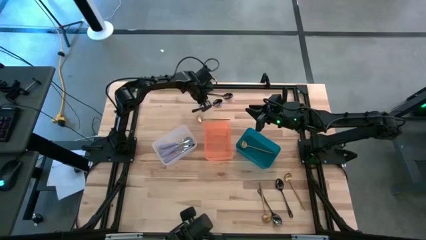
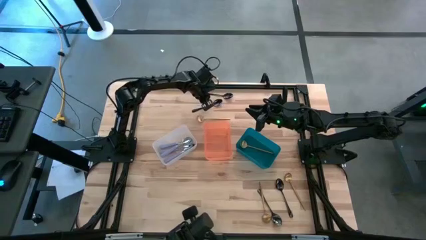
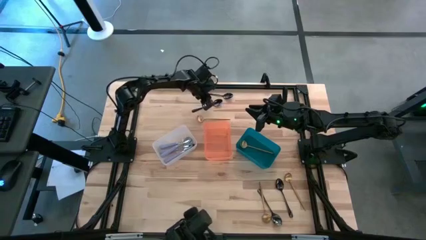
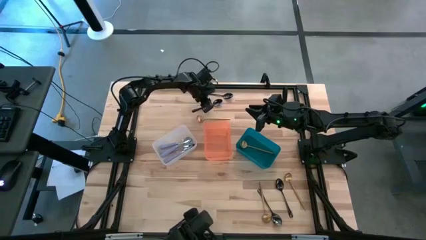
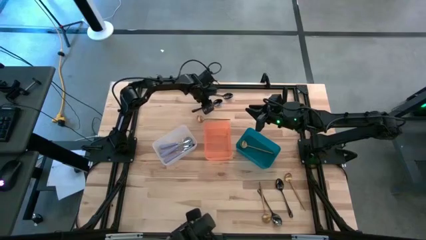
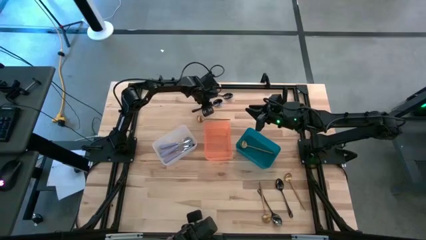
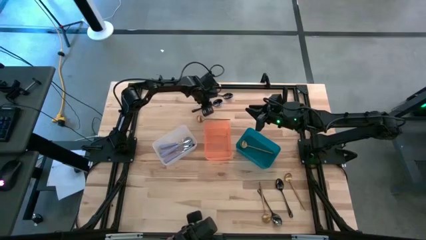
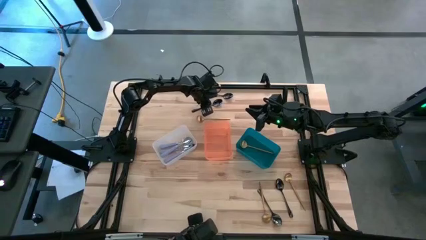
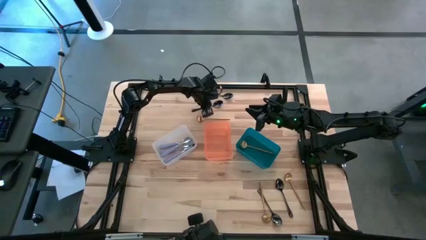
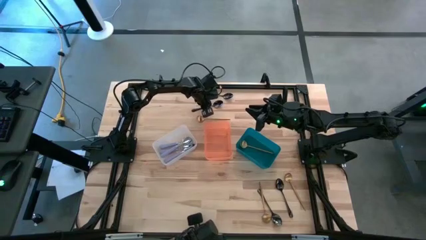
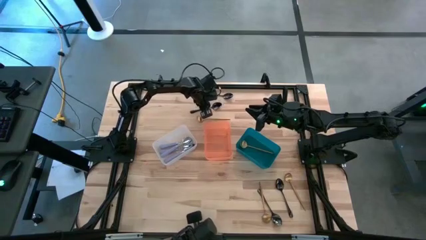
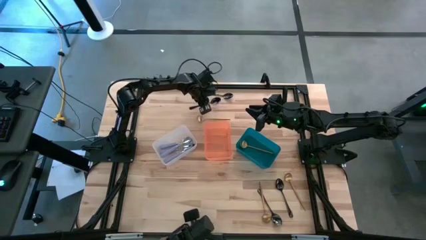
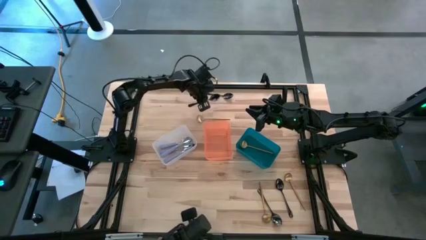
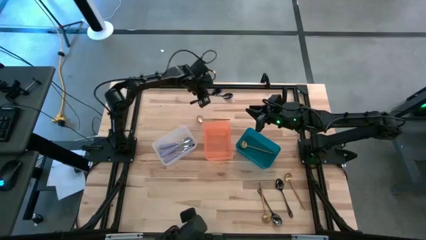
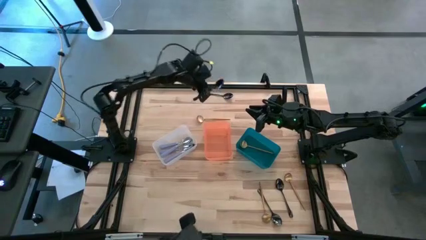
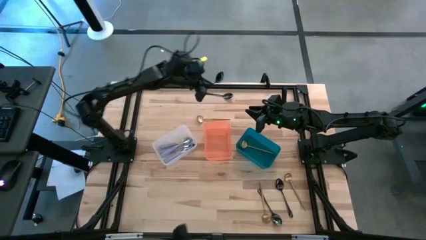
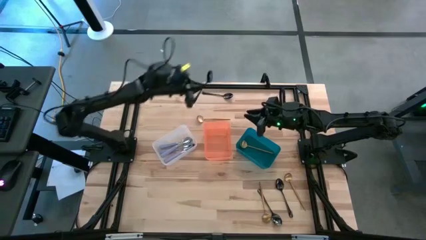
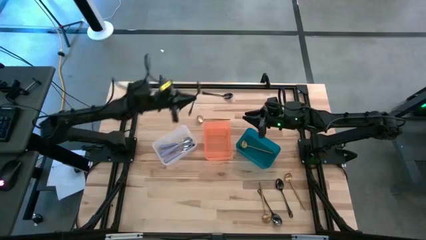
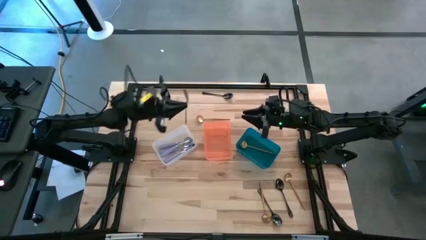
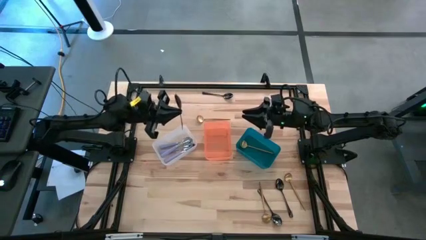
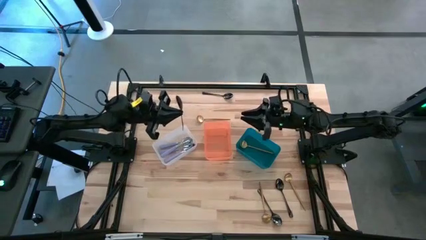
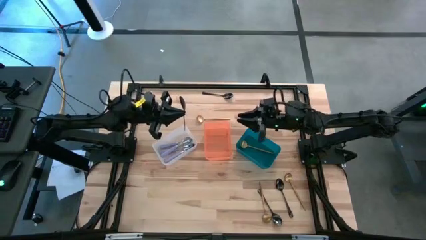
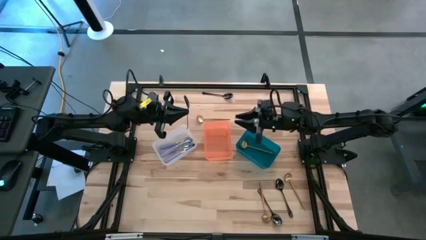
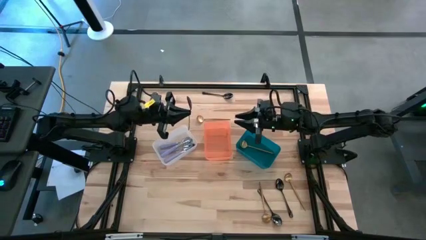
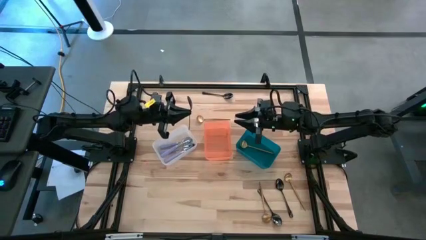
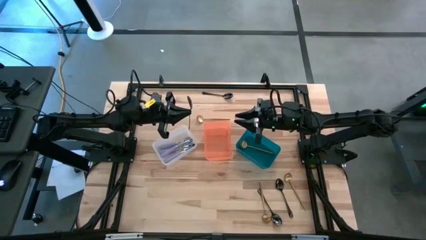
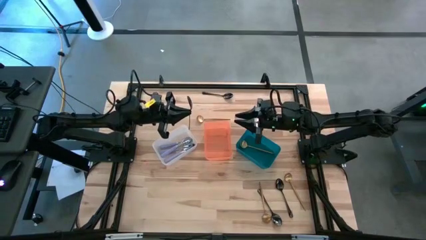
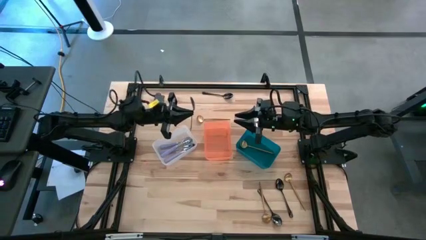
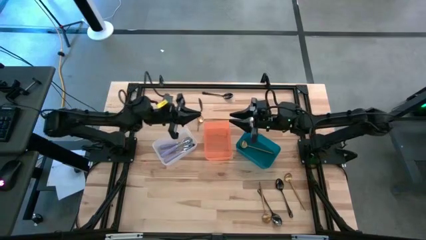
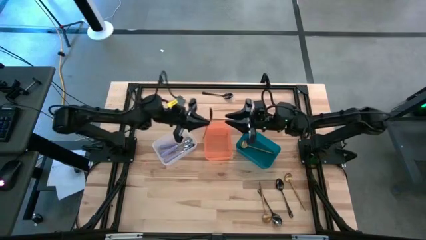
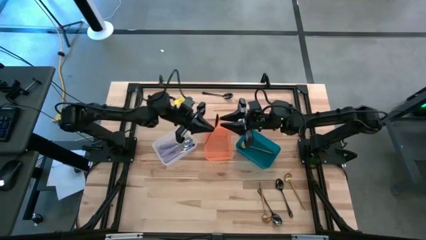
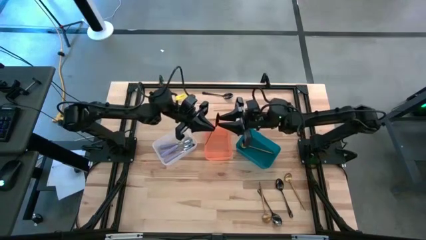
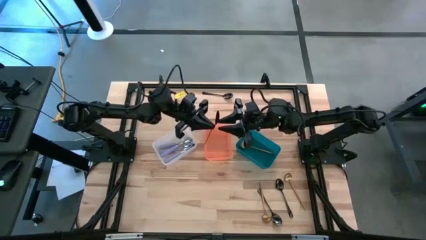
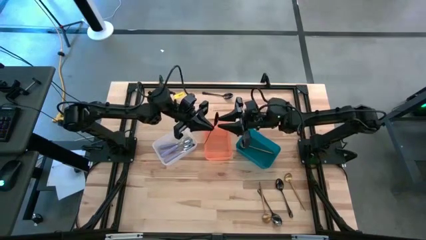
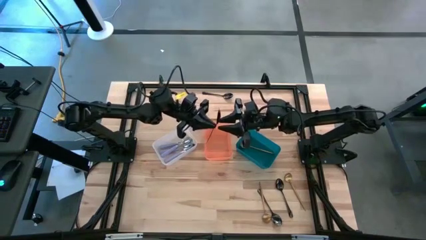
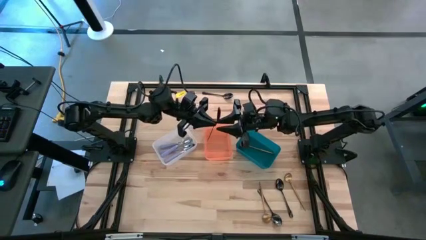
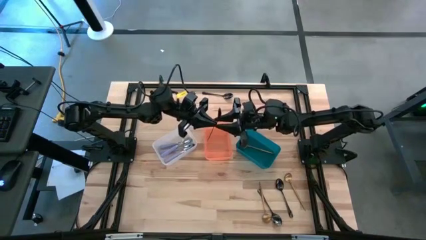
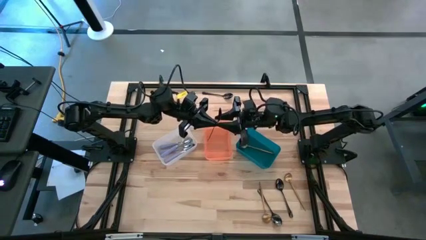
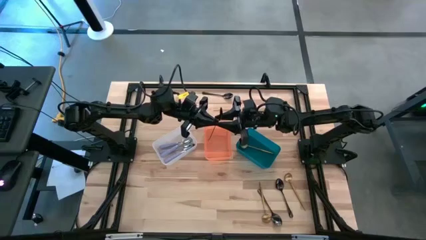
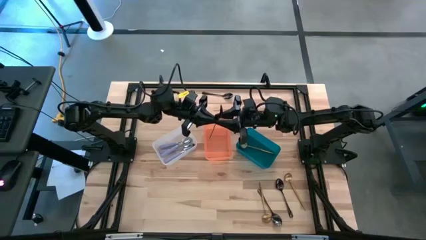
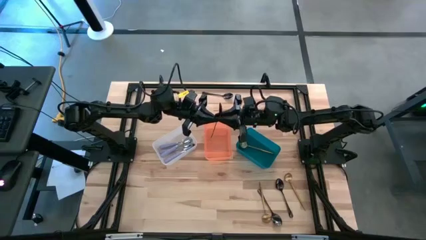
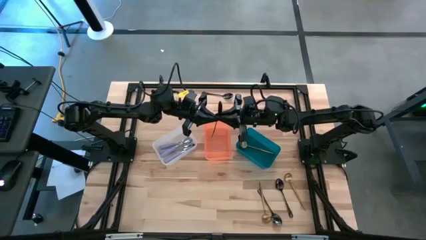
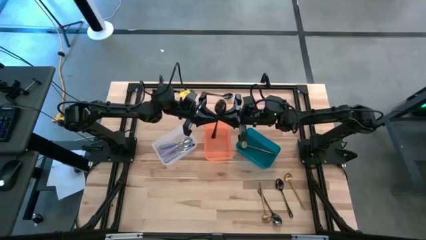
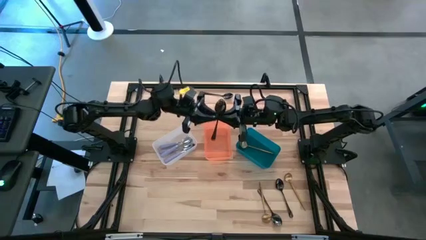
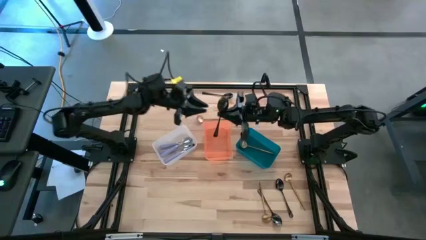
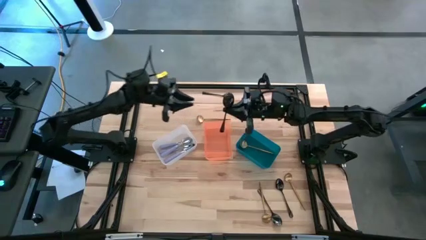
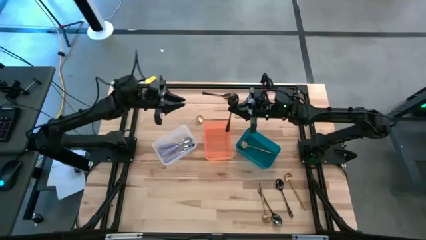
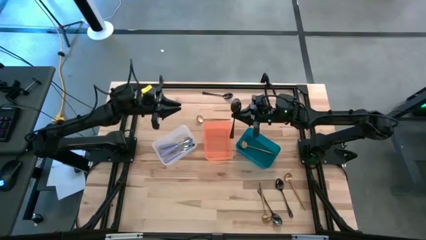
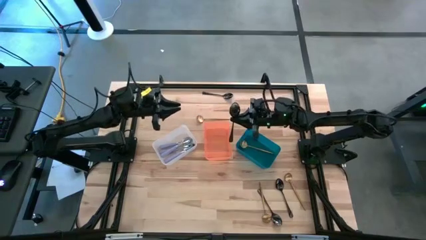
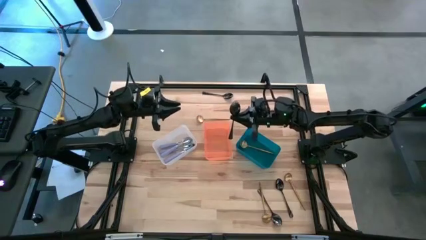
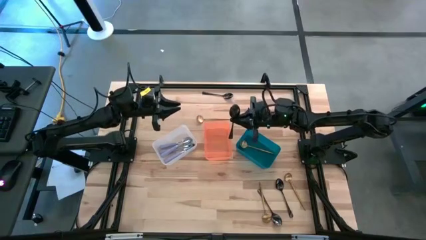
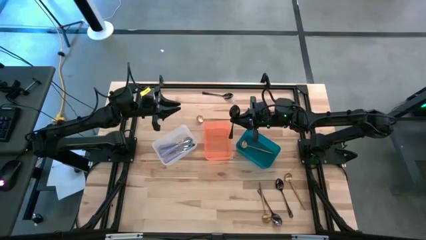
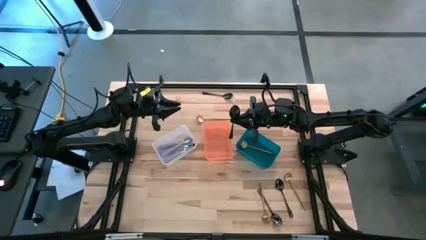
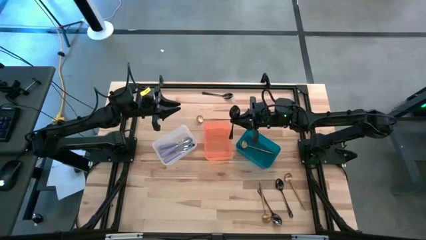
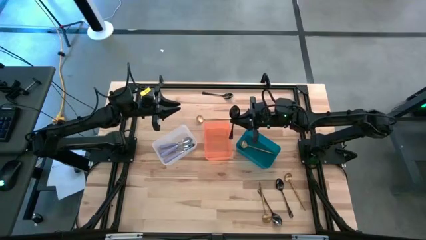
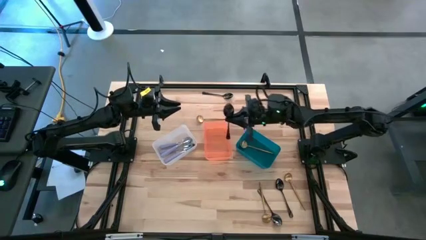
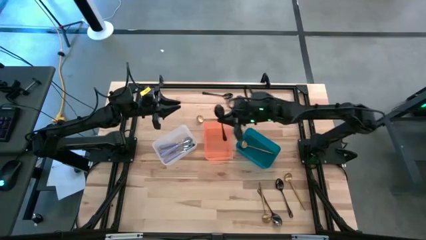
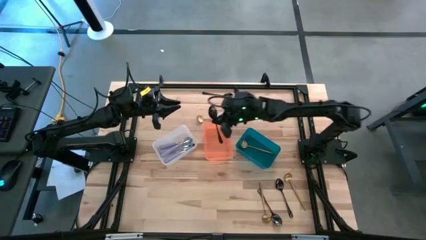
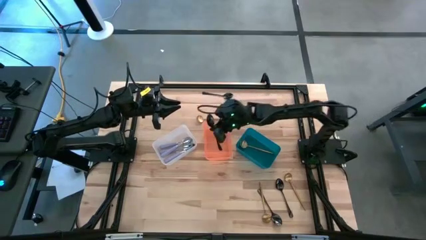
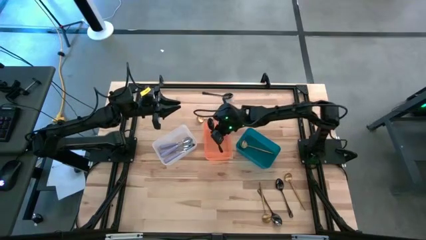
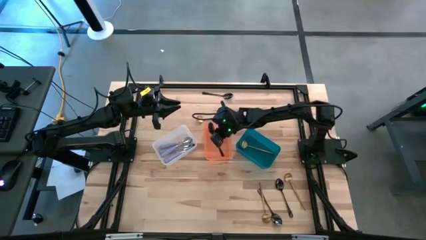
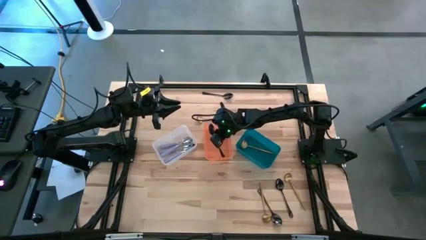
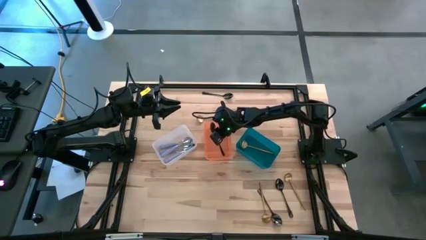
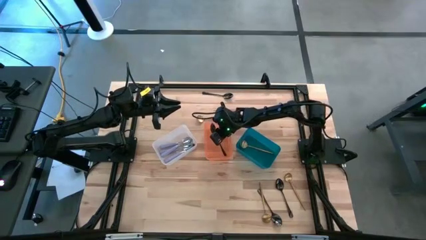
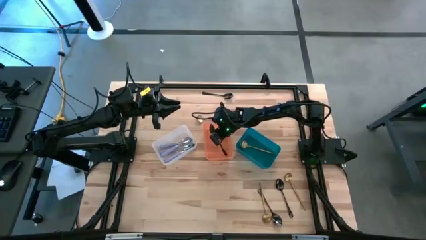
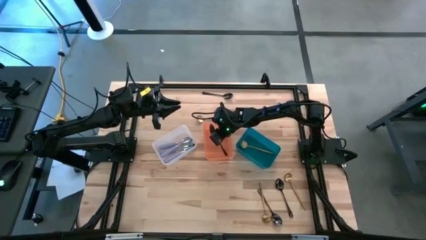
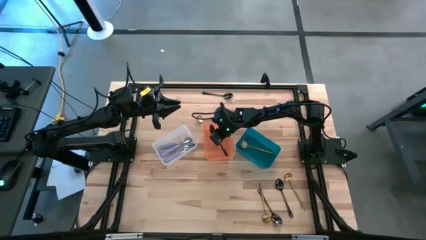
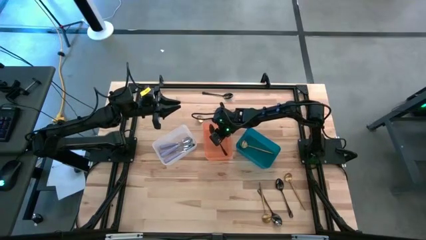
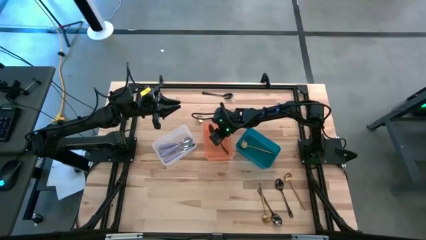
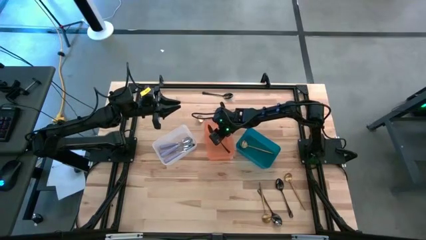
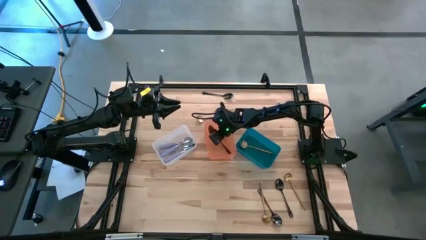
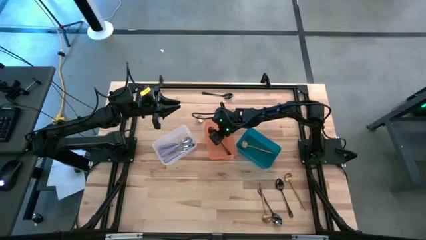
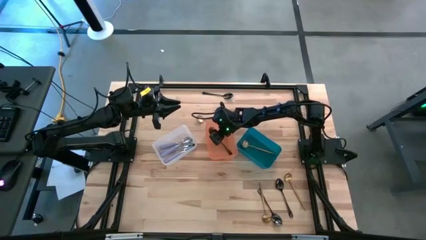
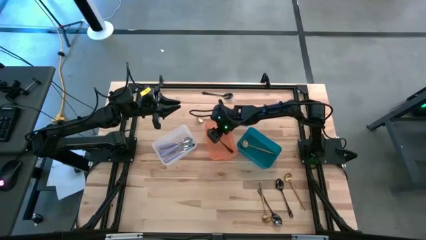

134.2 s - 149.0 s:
Task: Sort silverware by color (type)
Put the black spoon into the orange bin
